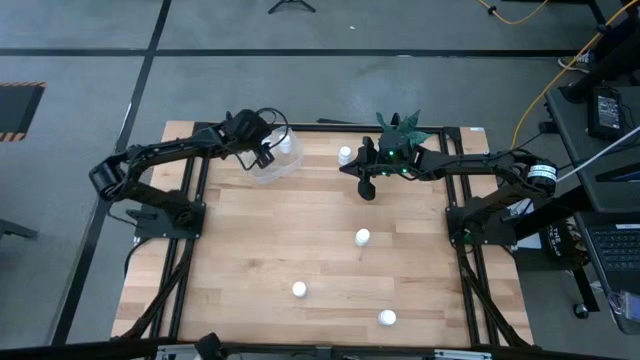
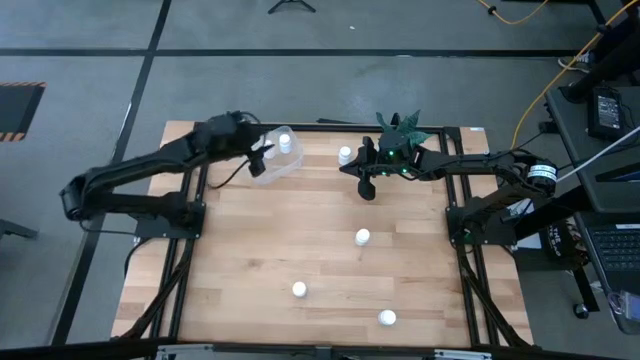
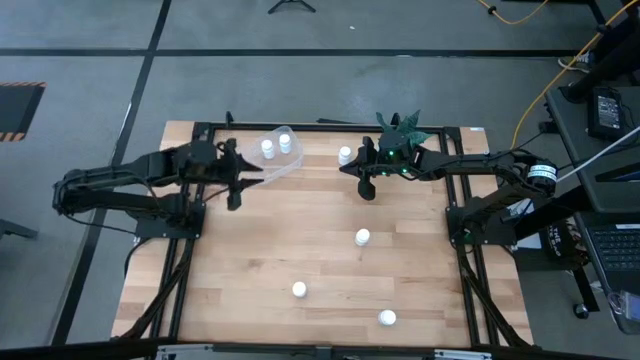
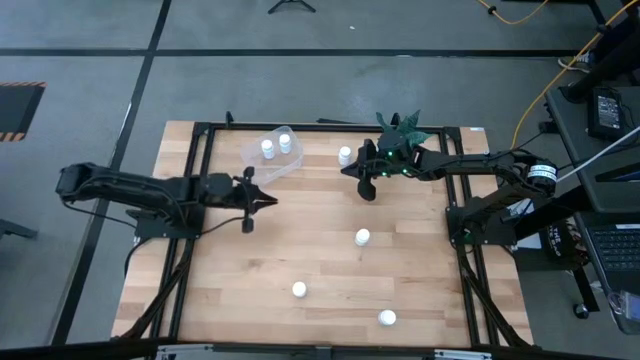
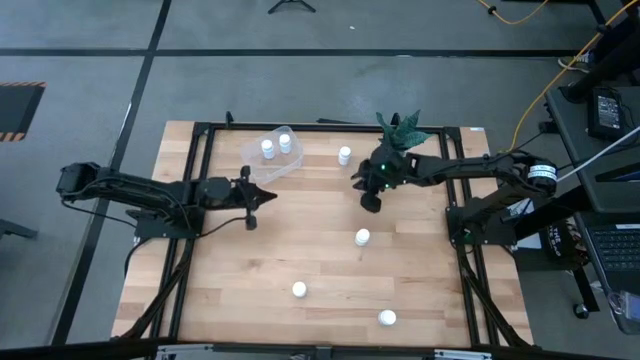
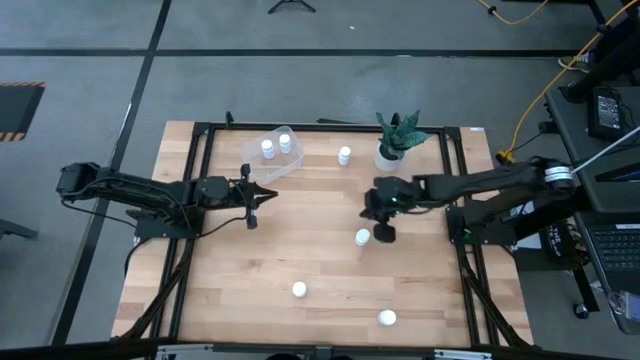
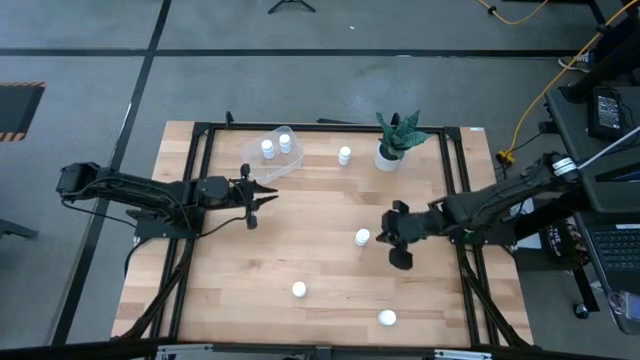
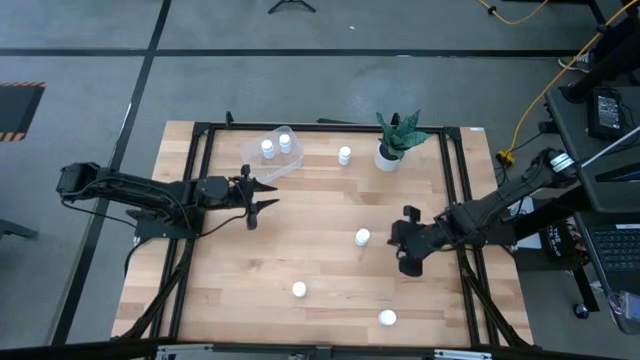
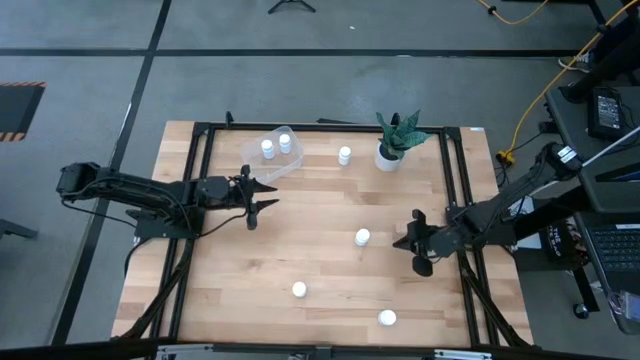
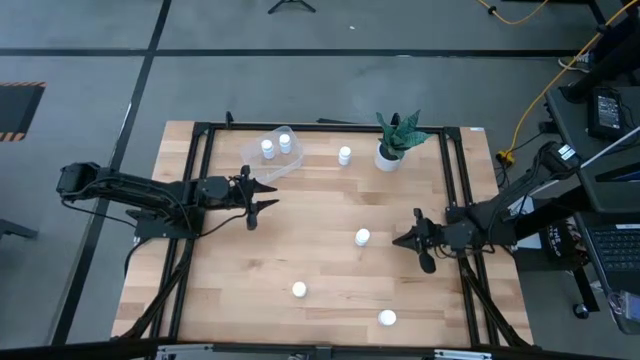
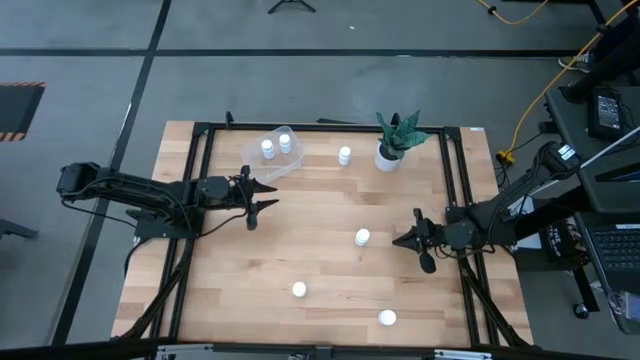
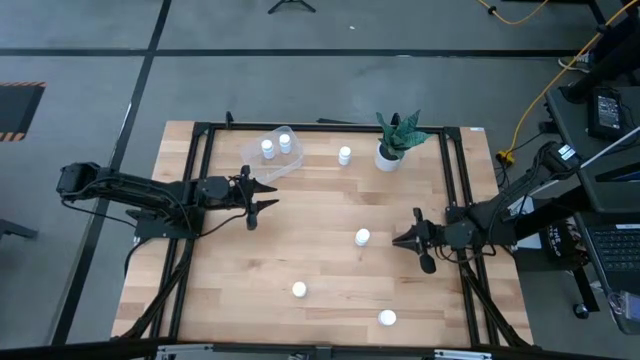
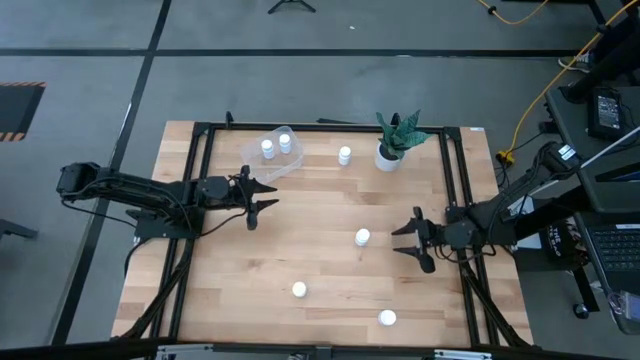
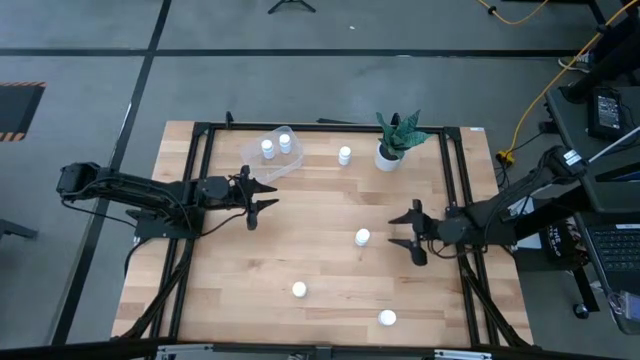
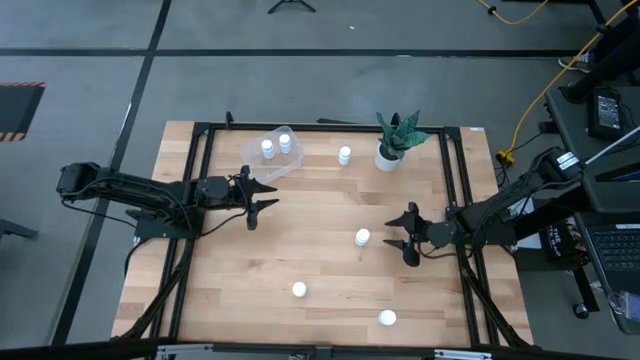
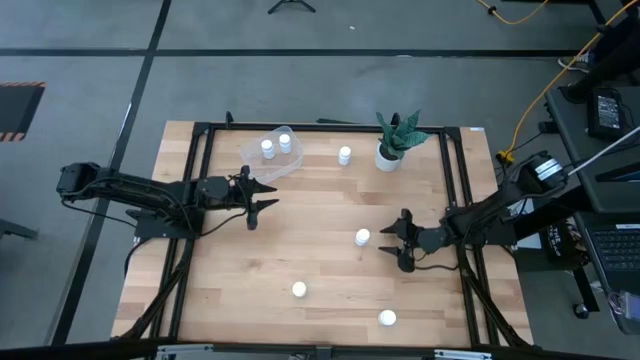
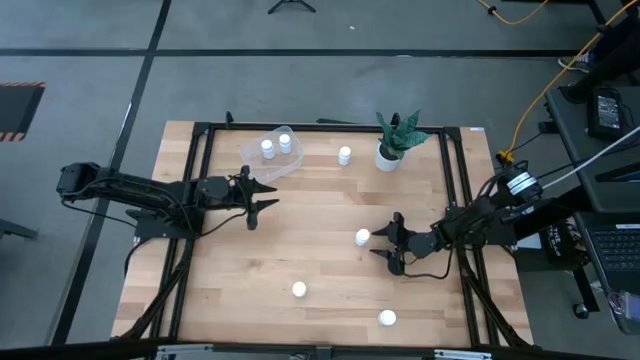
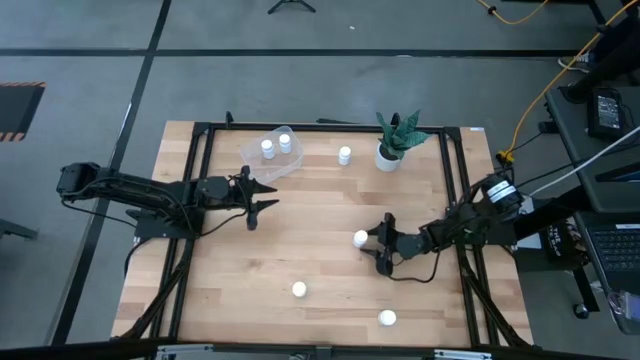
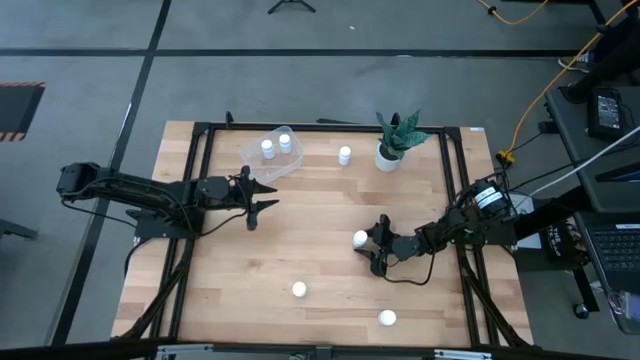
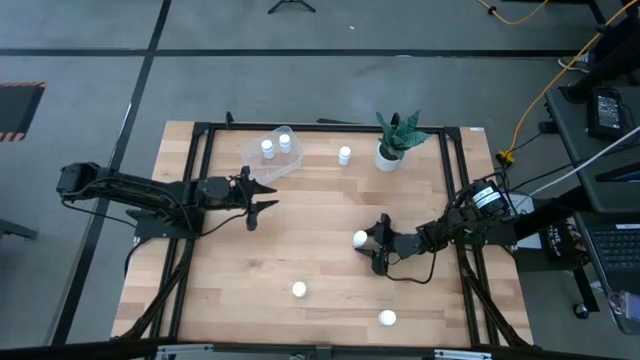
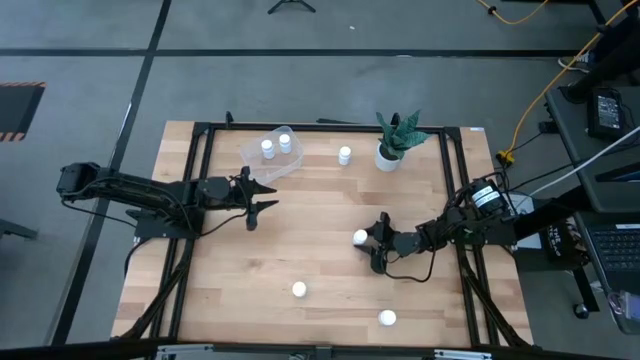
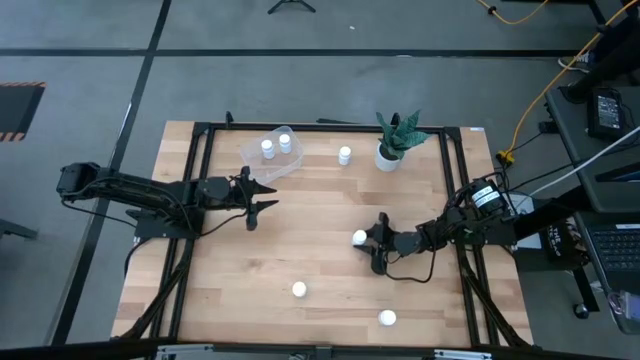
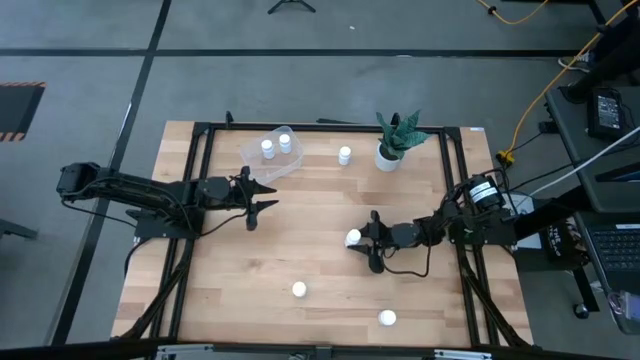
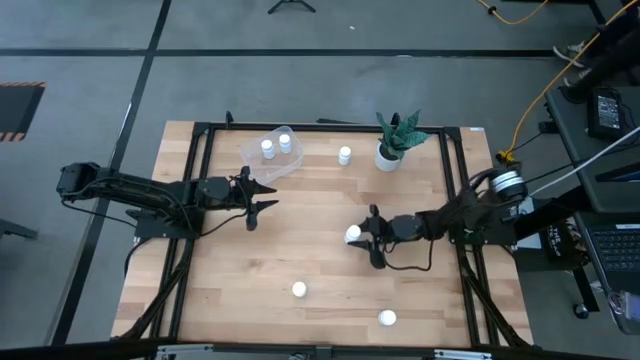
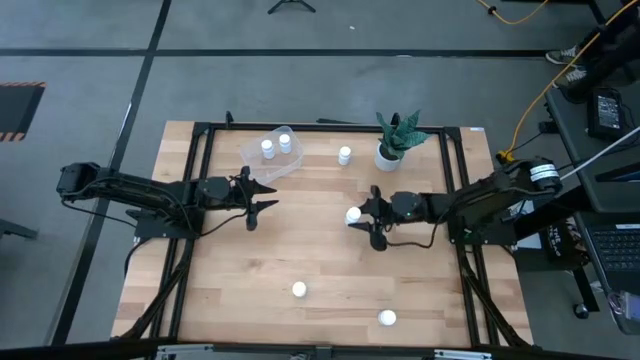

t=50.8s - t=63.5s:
Task: Pick and place pill bottles into a basket
Put the white pill bottle into the transparent container

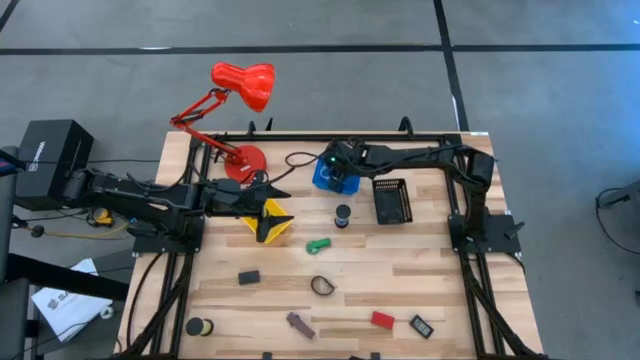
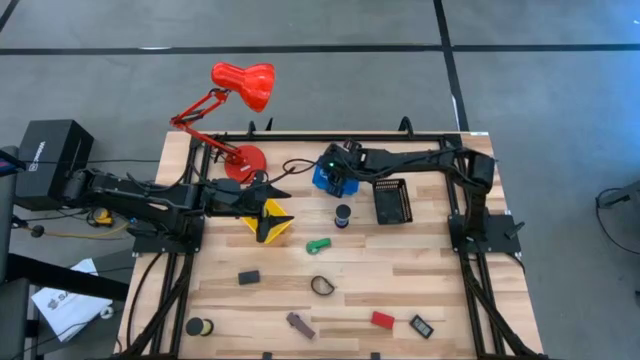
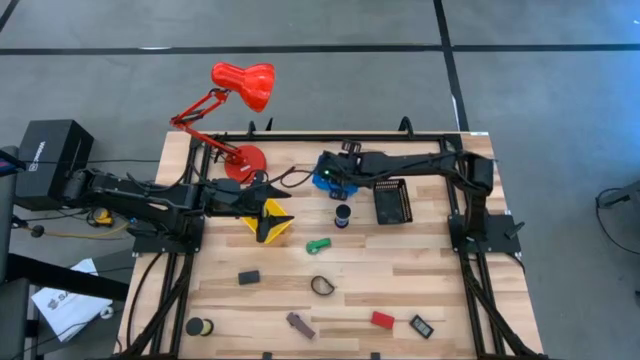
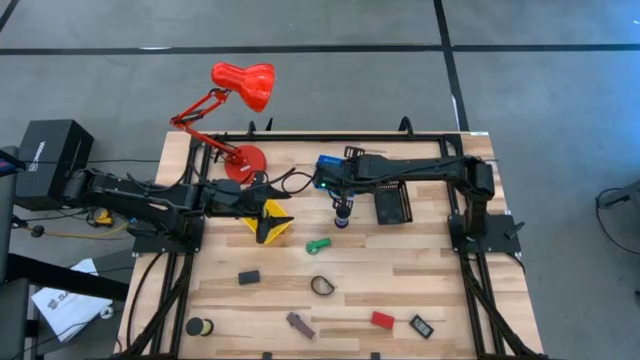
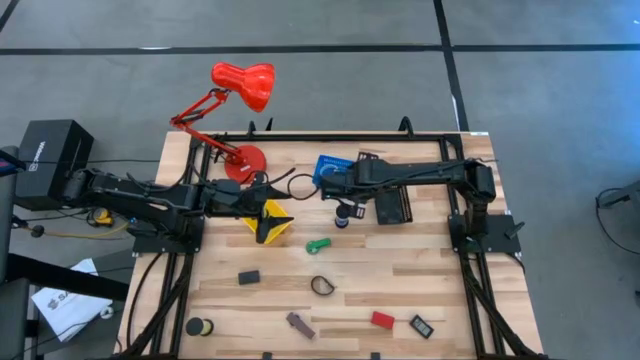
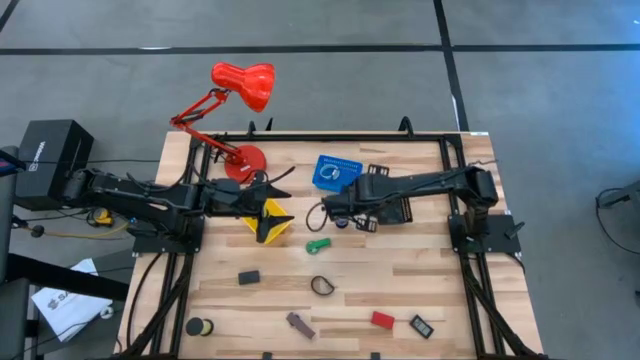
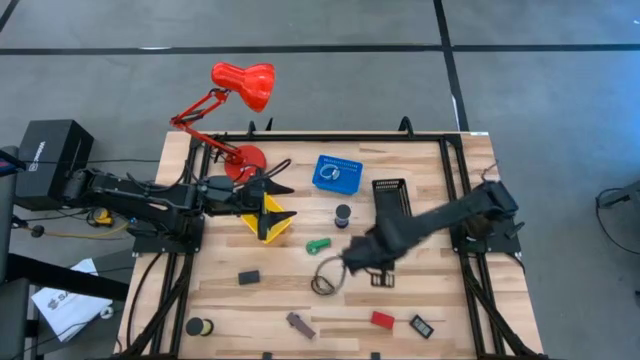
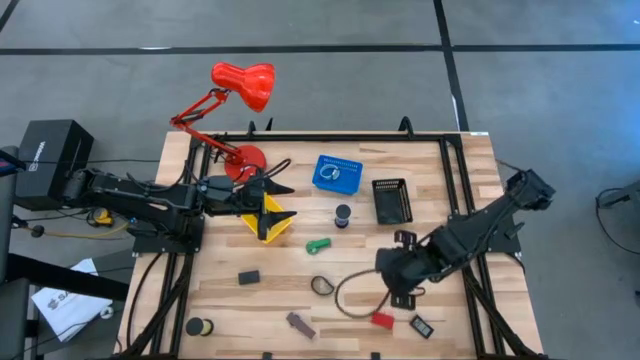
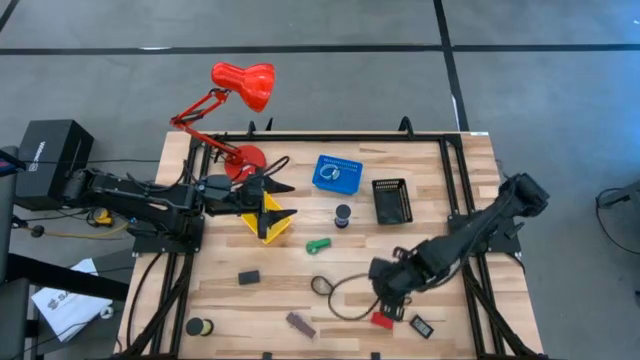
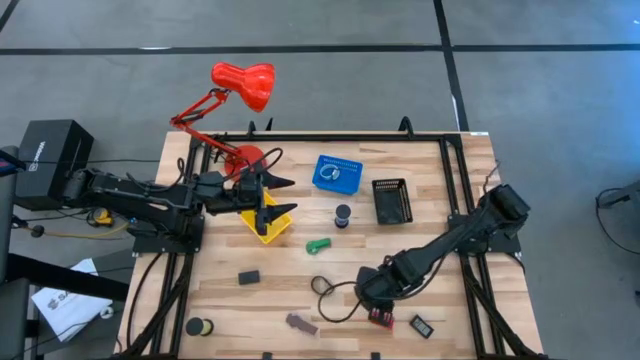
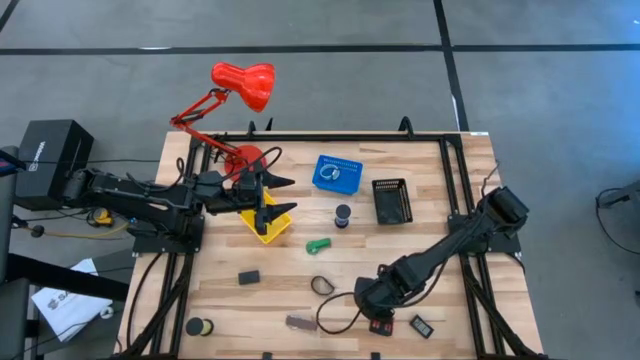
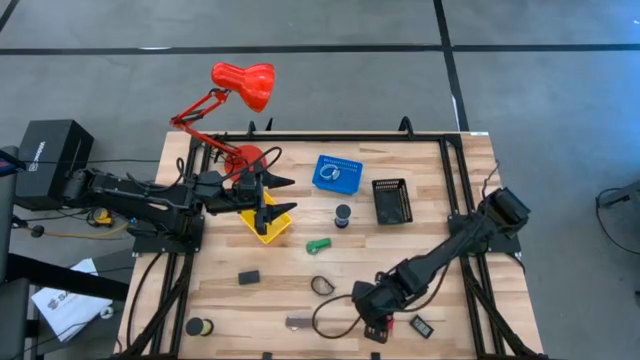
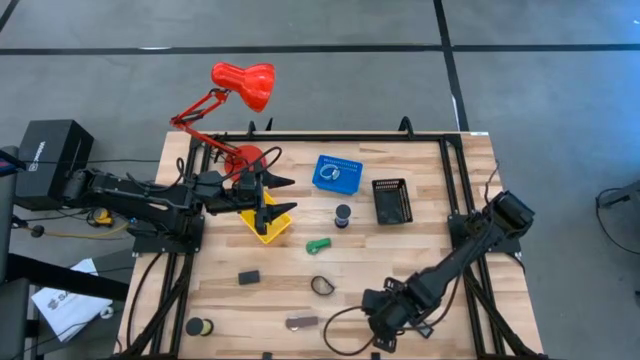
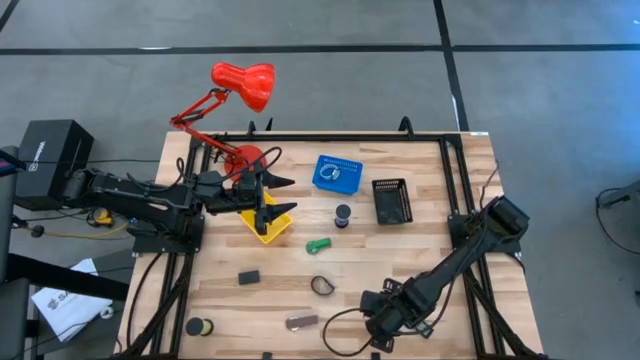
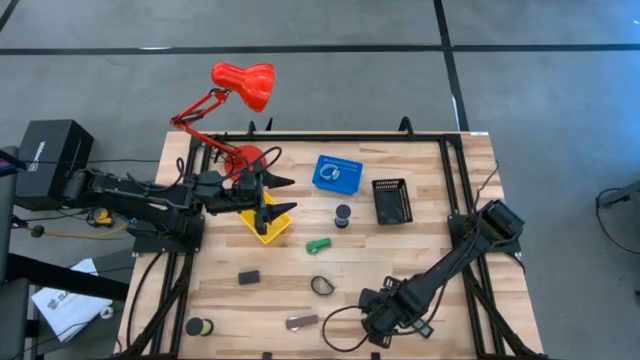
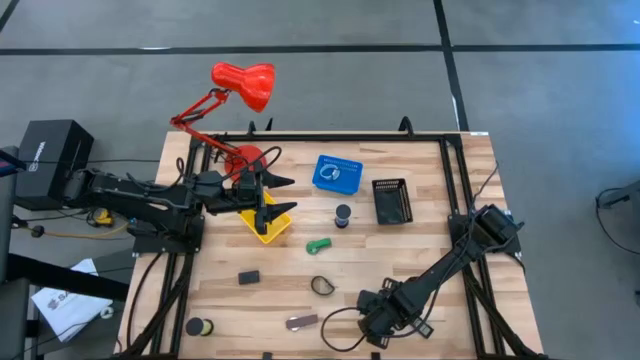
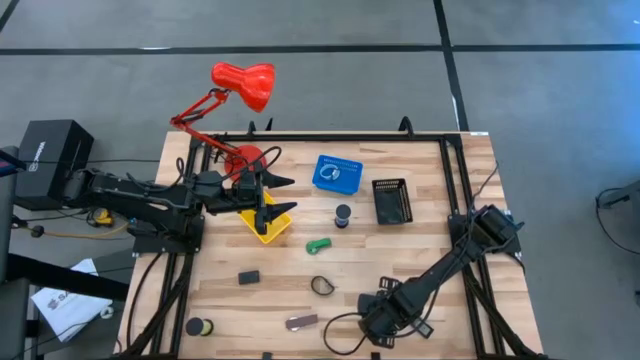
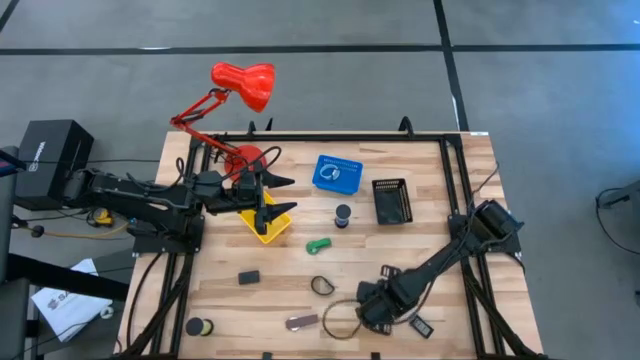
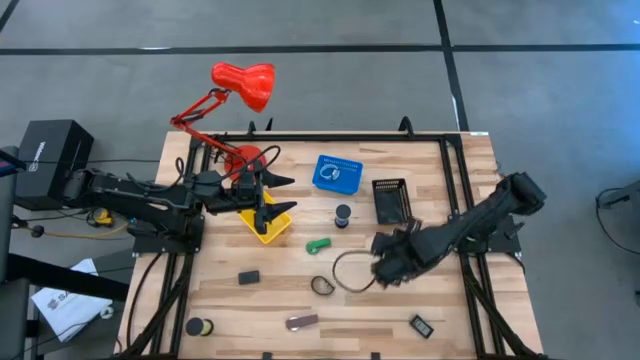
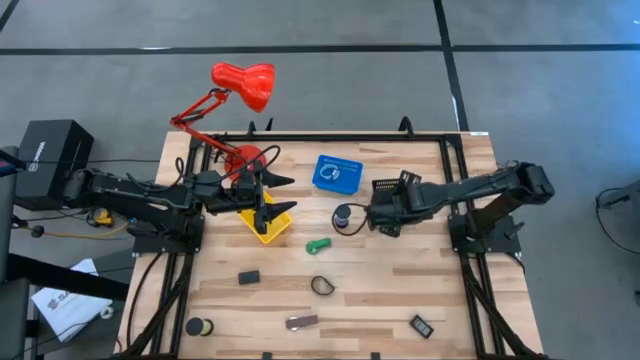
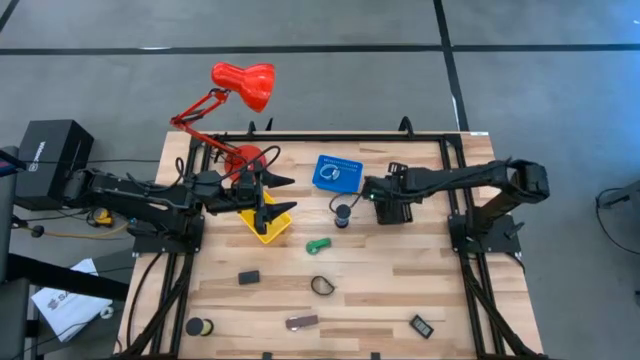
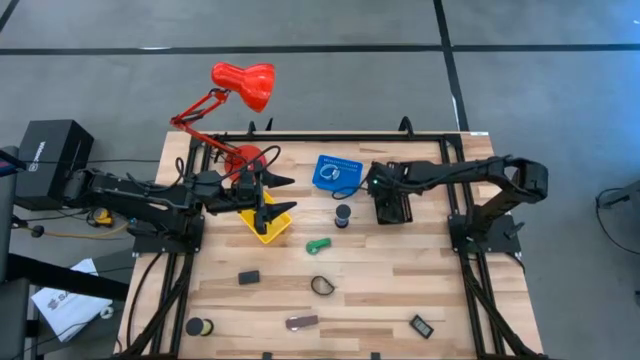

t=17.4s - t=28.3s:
Task: Pick & Place Office items
Put the red digital clock into the black bin
